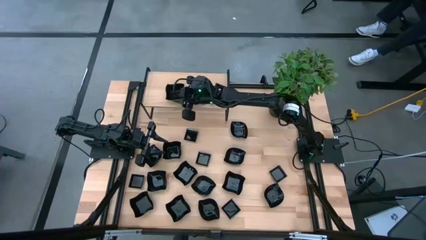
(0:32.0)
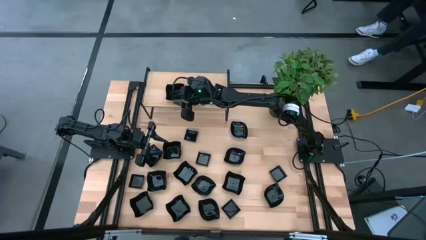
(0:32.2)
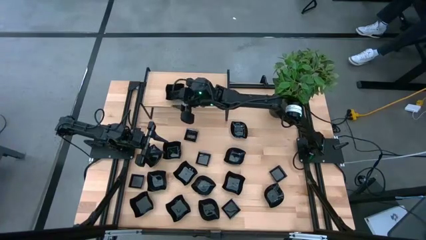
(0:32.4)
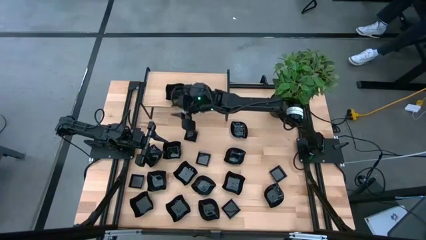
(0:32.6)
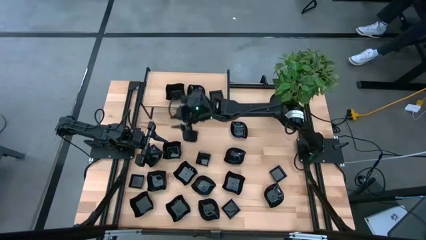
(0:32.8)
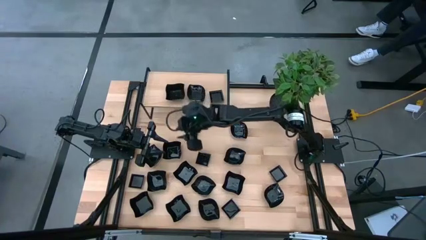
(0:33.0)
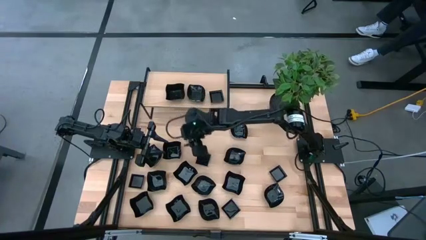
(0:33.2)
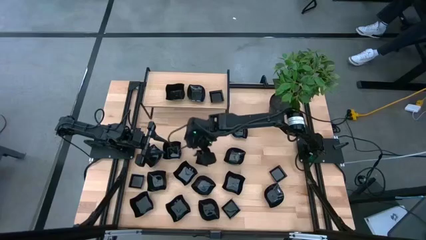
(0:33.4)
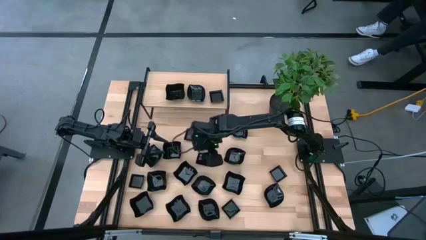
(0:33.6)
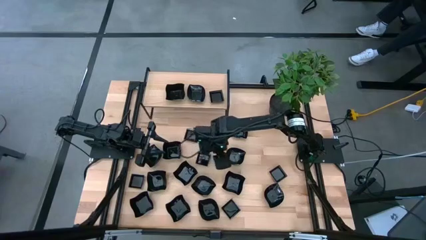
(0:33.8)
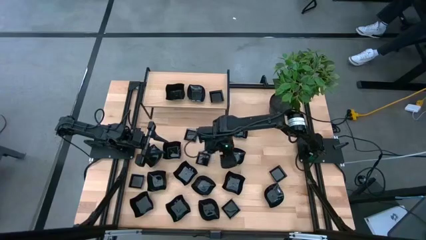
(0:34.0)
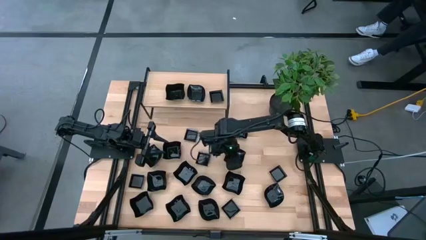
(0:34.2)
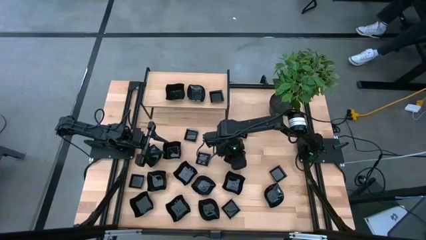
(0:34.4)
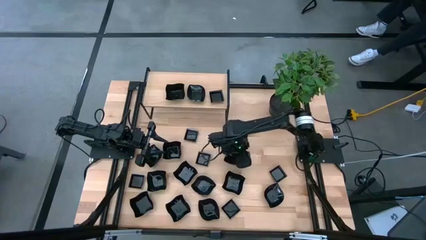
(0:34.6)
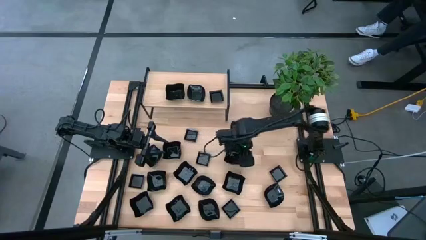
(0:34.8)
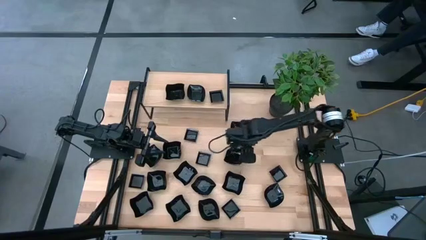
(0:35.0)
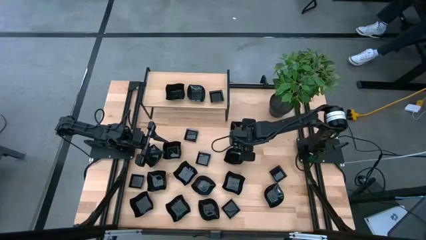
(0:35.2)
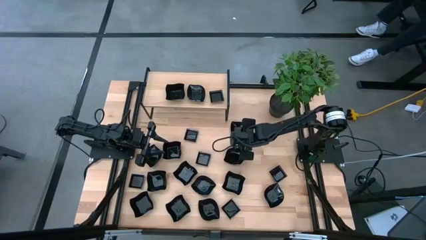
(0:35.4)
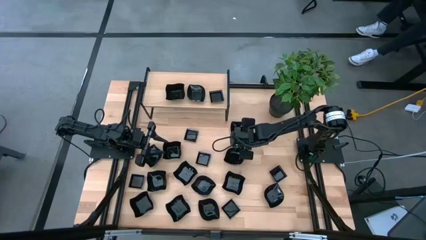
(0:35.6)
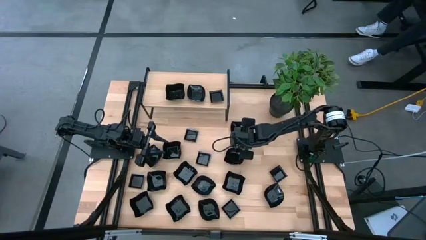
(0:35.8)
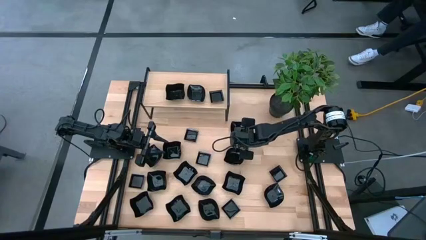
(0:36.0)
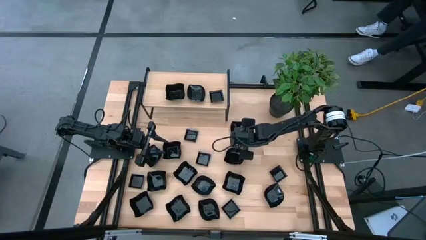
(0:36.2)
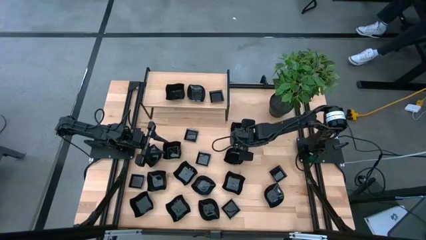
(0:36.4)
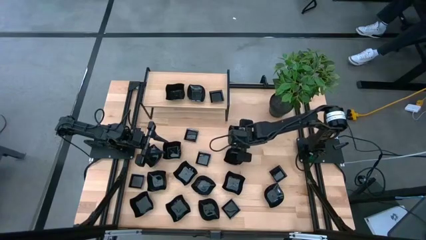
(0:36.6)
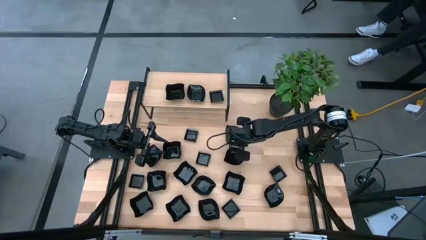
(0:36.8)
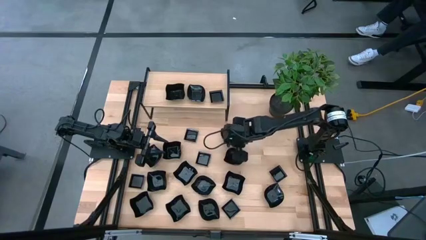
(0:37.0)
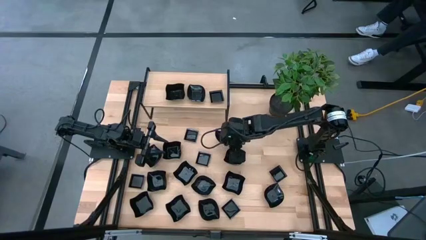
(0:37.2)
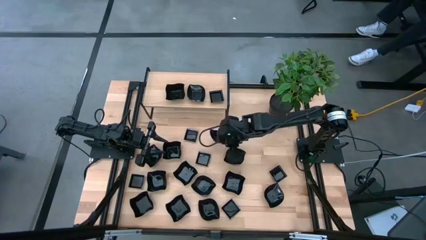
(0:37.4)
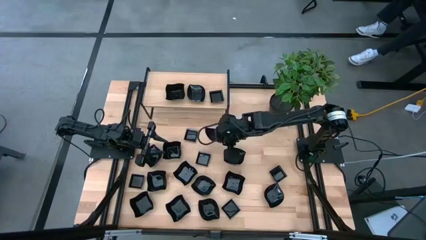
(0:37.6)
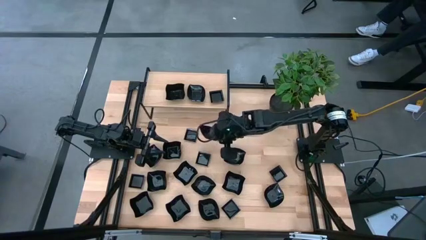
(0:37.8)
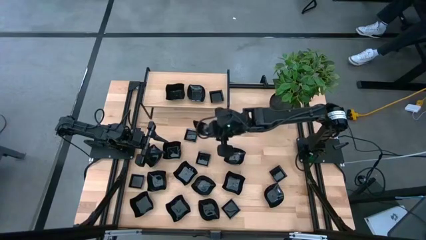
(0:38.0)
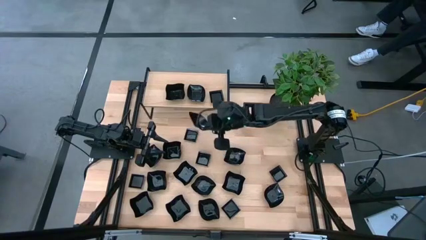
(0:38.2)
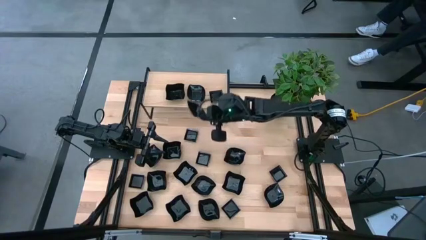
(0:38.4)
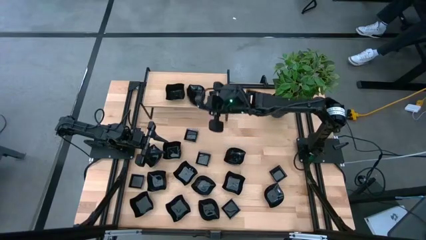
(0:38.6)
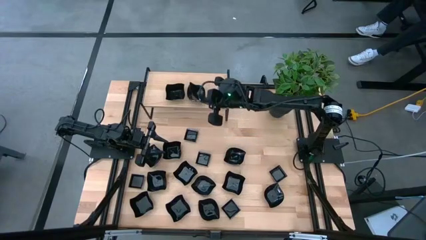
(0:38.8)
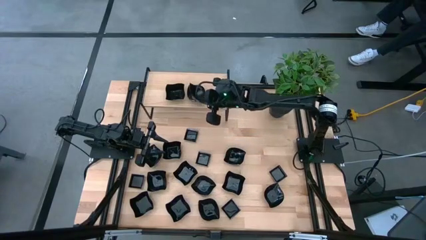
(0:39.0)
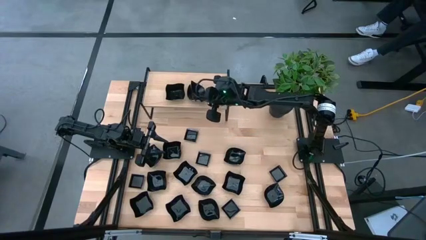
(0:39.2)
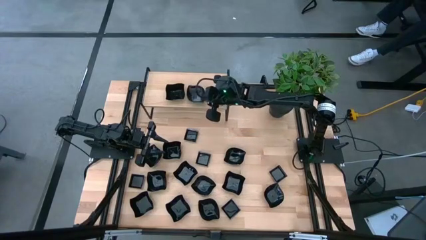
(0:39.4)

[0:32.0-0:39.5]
Task: Pick & Place Mini shaped plates
Stack the leaf shaped plate on top of the leaf shaped plate on the shelf

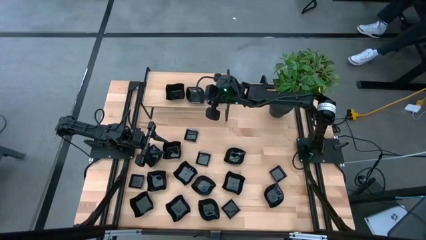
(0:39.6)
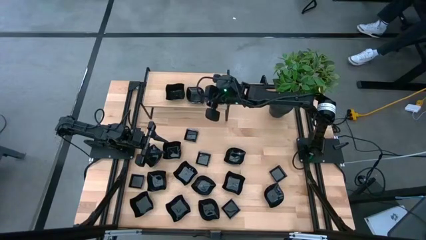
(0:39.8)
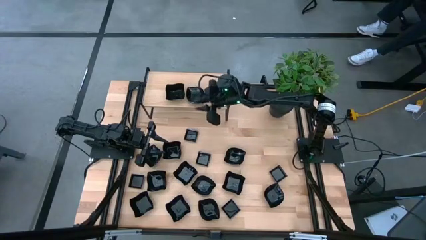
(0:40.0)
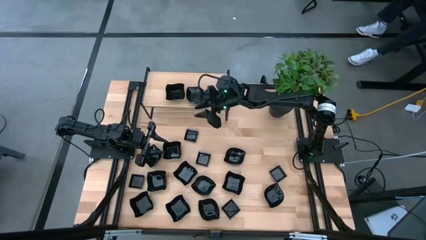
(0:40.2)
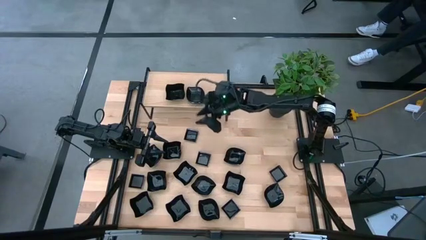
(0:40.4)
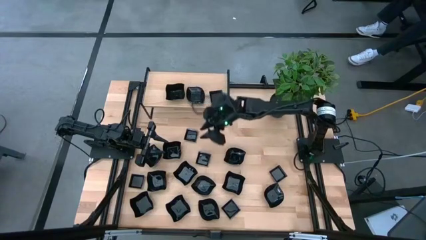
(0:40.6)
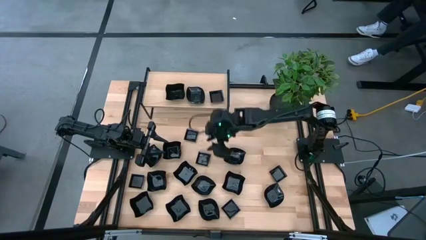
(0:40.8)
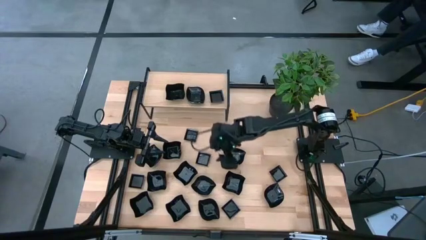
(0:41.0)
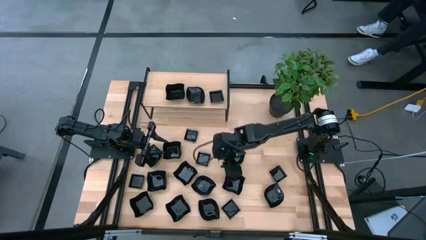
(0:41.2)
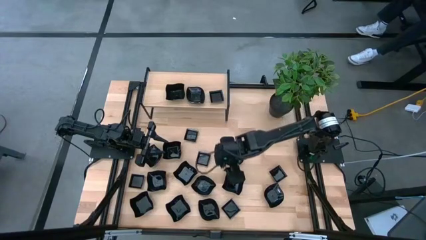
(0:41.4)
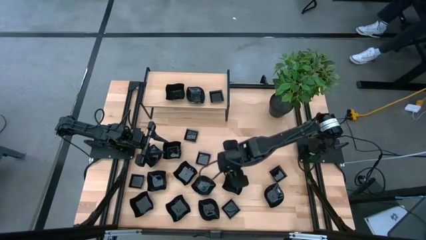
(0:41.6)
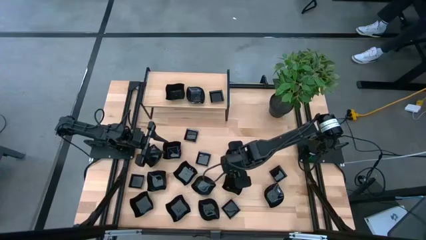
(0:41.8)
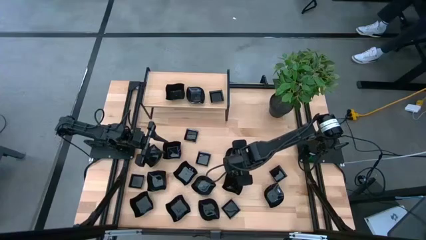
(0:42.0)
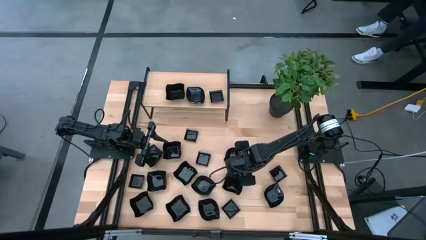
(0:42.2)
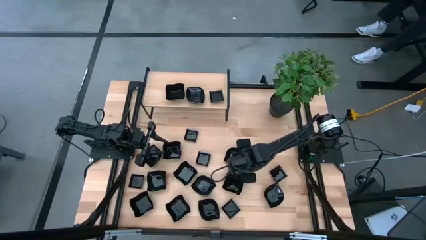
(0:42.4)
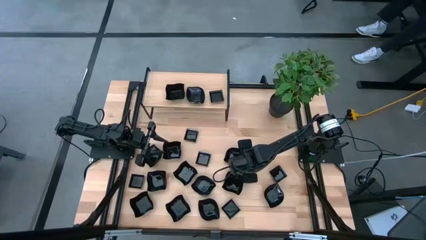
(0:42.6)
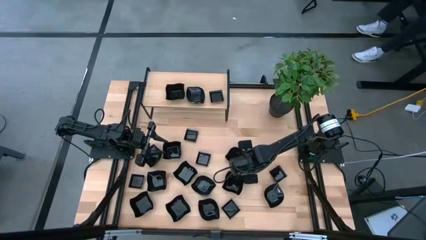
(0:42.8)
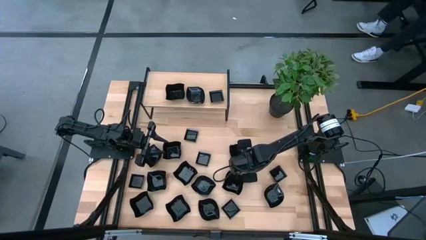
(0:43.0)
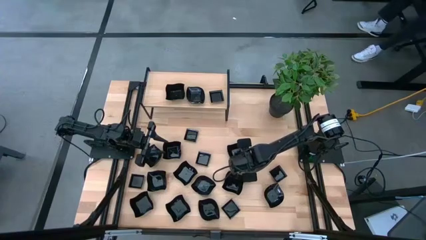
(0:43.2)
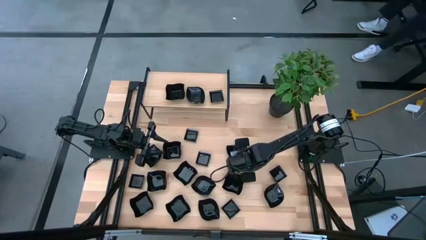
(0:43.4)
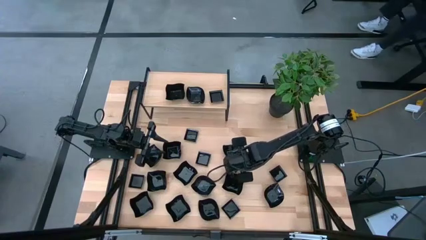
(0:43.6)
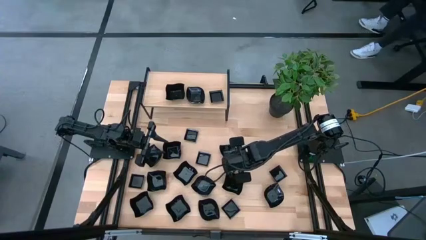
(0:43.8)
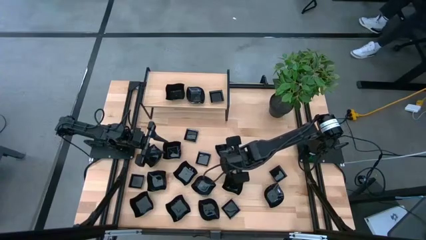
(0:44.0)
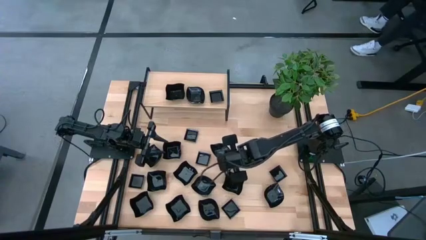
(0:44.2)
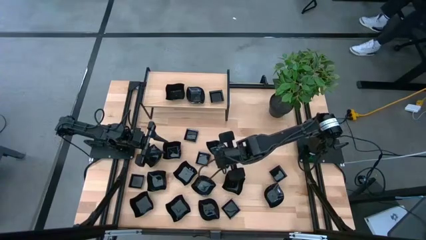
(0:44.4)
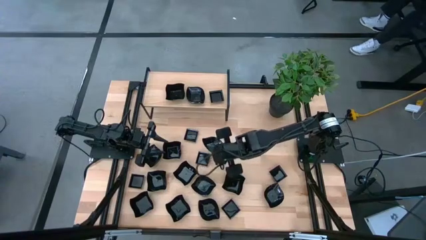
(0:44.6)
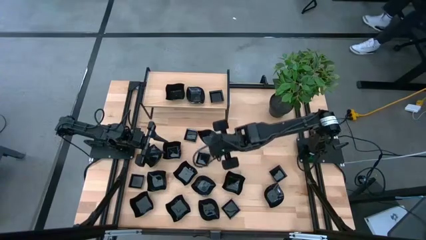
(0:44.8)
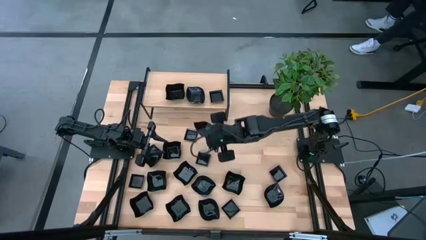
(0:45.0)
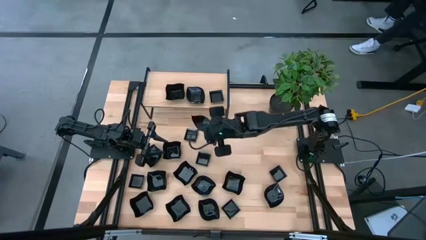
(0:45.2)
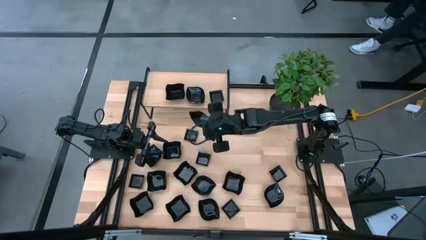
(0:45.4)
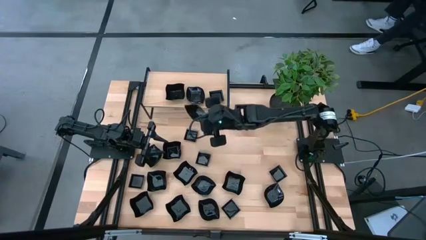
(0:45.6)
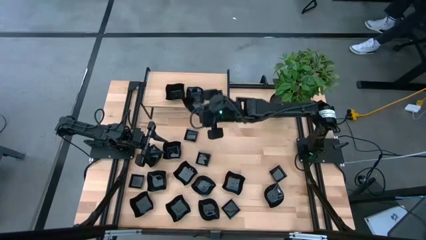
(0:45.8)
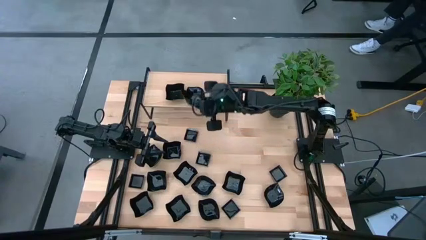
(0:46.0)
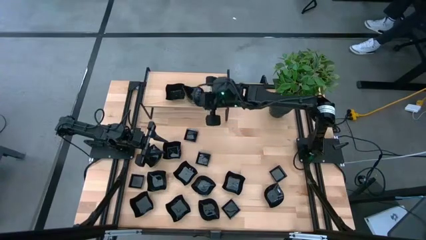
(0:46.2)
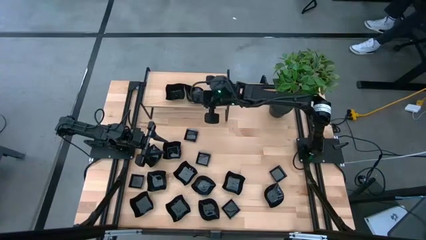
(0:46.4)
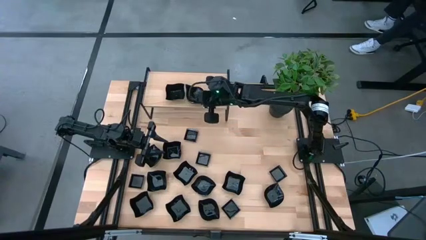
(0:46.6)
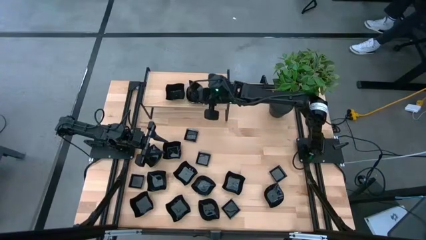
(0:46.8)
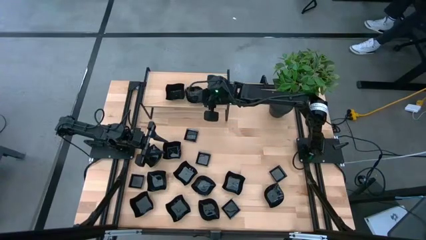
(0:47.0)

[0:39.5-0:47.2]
Stack the leaf shaped plate on top of the leaf shaped plates on the shelf

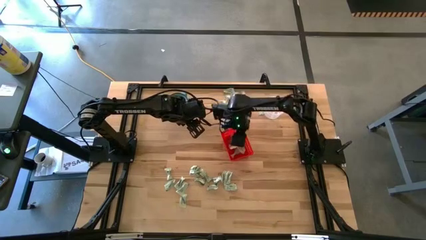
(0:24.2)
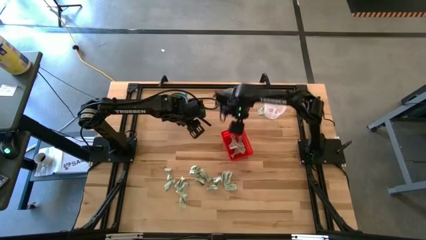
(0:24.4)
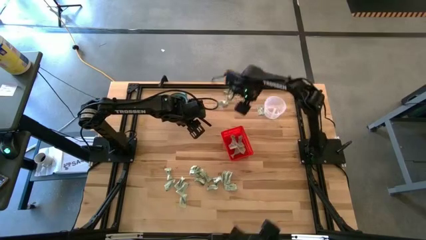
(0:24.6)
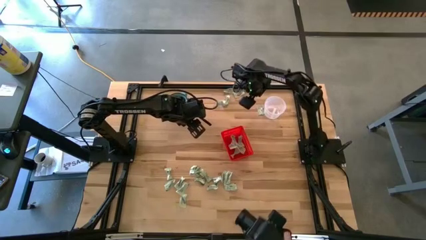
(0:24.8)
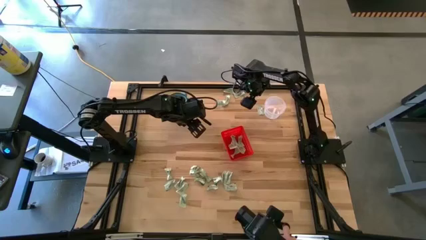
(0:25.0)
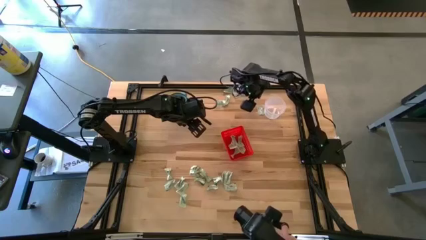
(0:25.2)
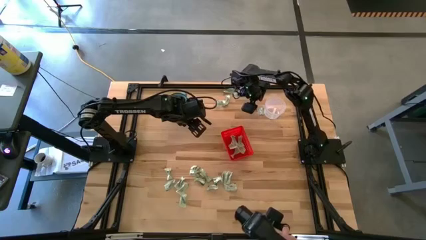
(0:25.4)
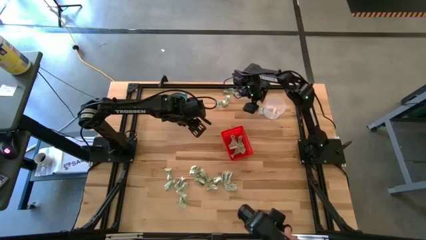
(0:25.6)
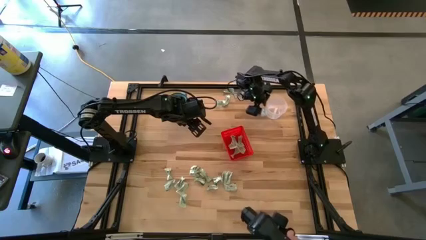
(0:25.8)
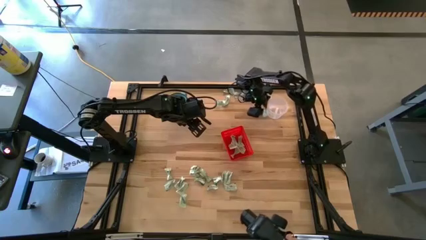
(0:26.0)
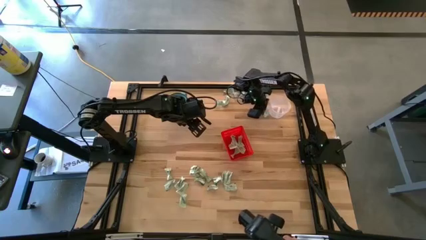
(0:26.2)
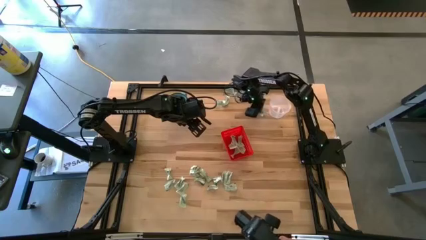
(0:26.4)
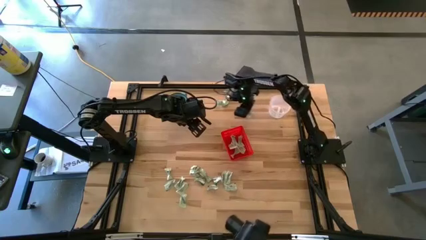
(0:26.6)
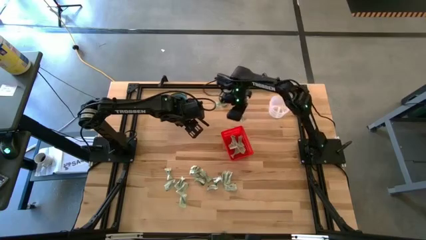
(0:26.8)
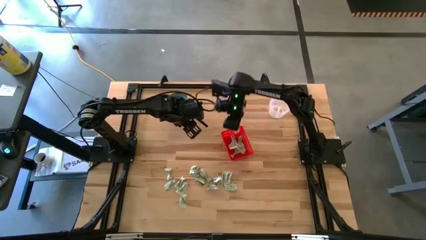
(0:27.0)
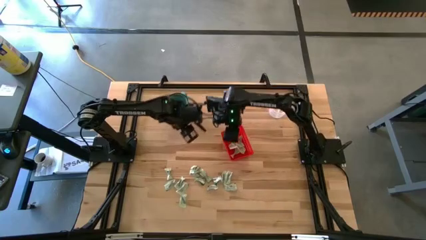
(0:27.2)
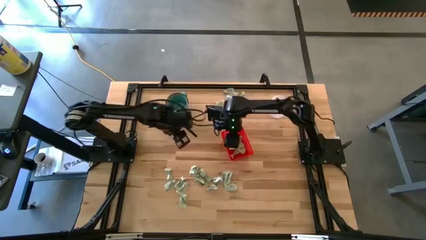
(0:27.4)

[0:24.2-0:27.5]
Task: Pick and place items into bin
Put the stevia packet into the orange bin
